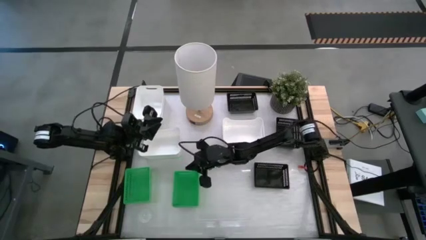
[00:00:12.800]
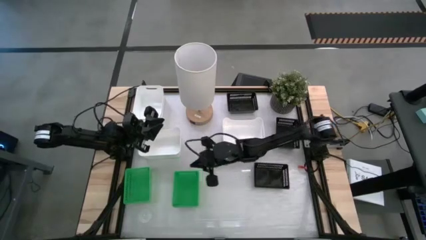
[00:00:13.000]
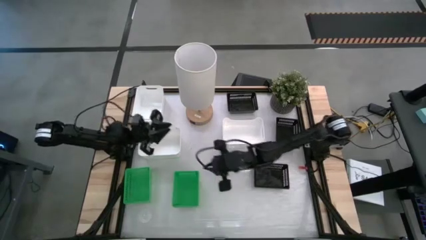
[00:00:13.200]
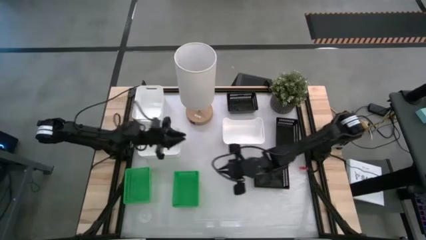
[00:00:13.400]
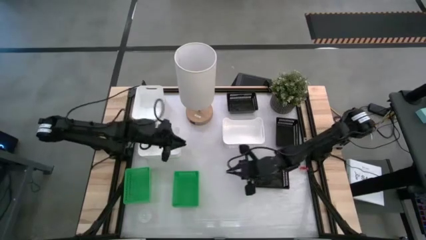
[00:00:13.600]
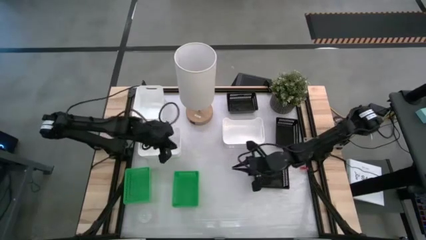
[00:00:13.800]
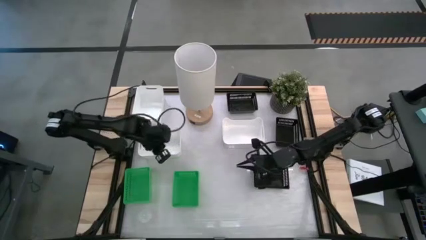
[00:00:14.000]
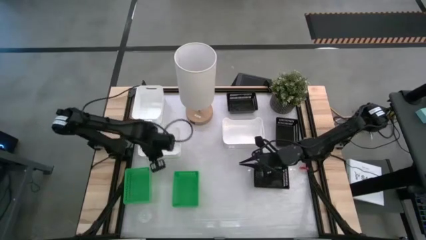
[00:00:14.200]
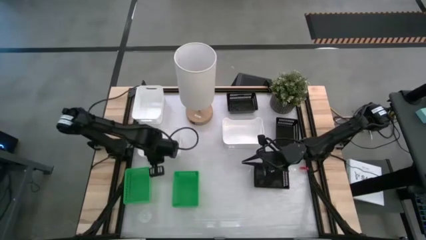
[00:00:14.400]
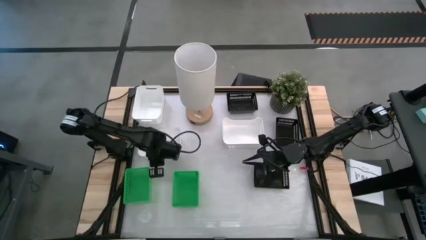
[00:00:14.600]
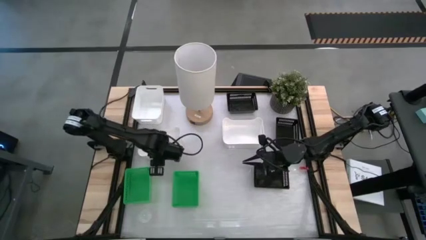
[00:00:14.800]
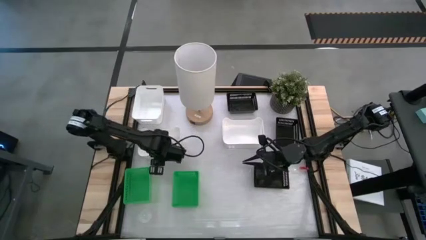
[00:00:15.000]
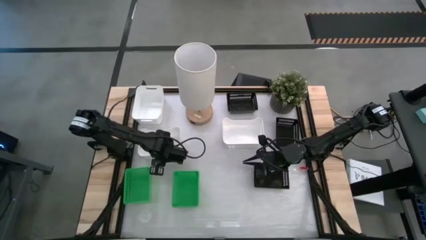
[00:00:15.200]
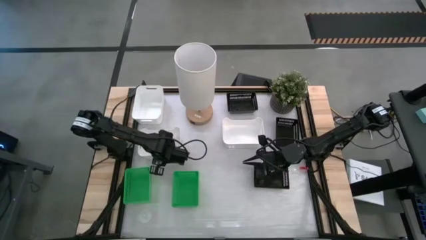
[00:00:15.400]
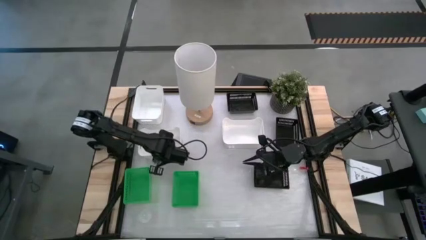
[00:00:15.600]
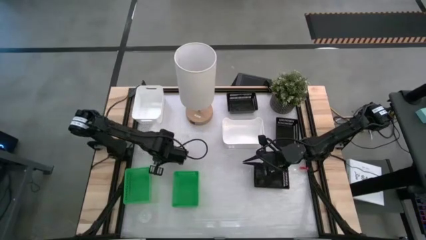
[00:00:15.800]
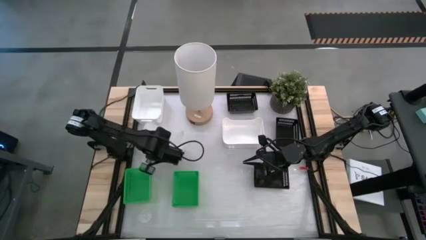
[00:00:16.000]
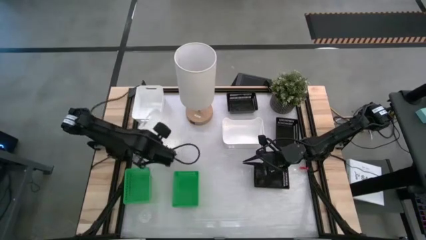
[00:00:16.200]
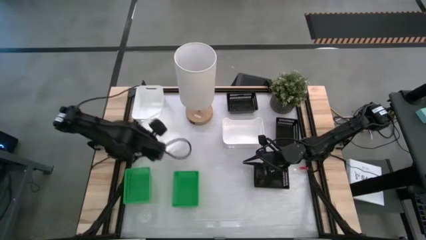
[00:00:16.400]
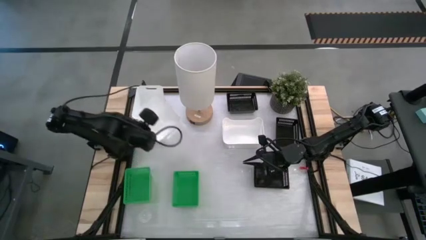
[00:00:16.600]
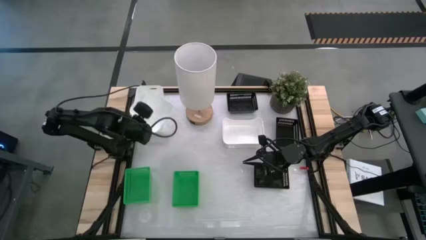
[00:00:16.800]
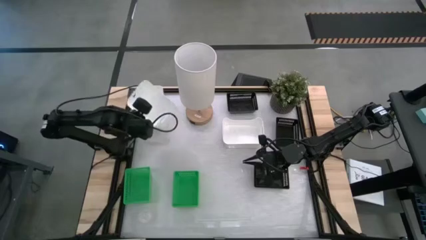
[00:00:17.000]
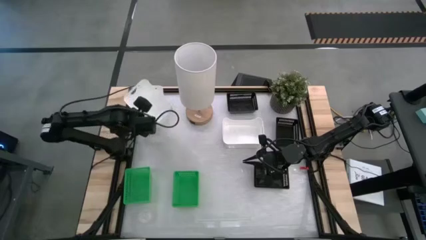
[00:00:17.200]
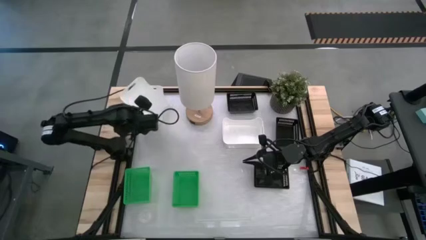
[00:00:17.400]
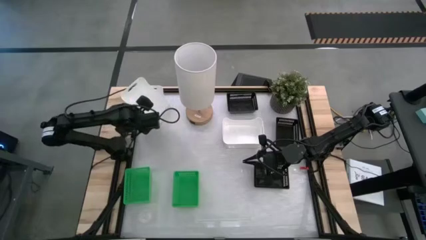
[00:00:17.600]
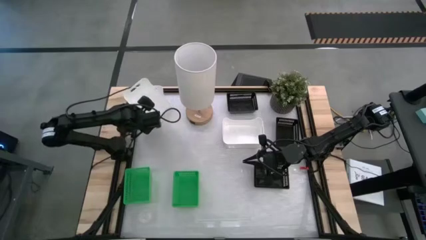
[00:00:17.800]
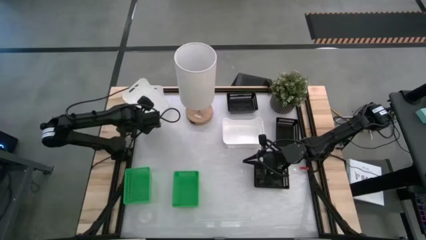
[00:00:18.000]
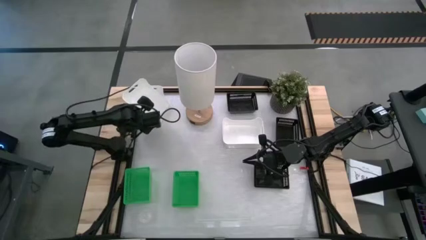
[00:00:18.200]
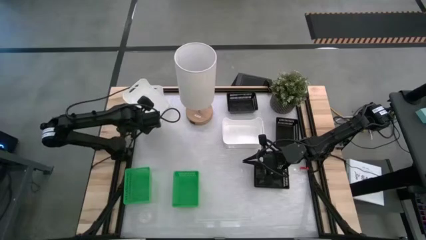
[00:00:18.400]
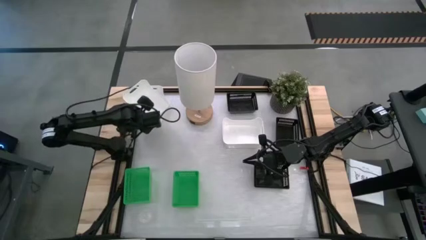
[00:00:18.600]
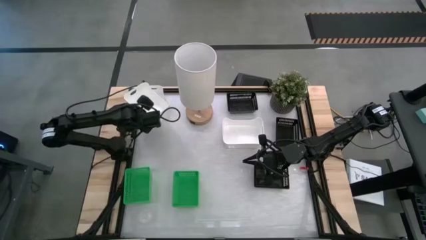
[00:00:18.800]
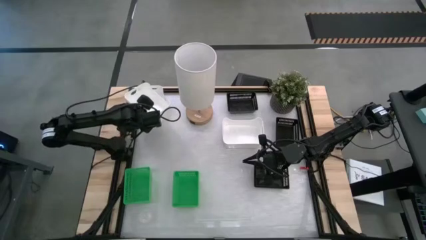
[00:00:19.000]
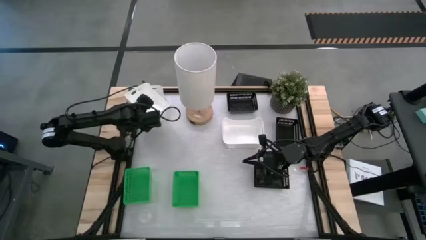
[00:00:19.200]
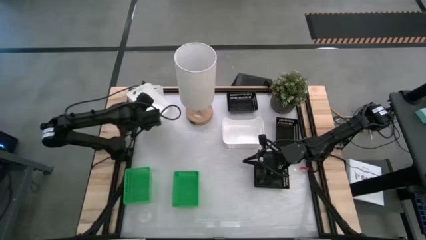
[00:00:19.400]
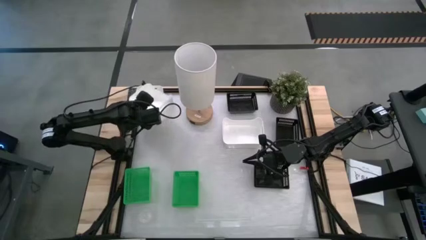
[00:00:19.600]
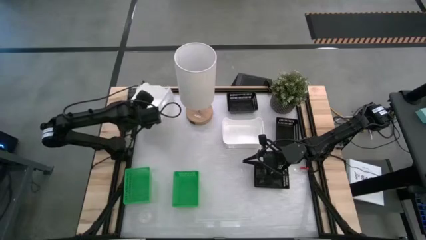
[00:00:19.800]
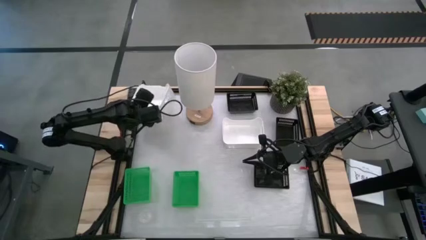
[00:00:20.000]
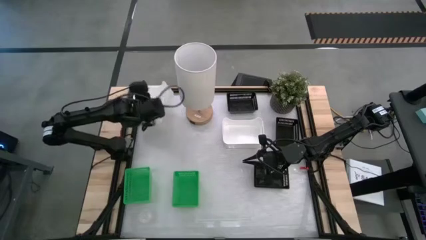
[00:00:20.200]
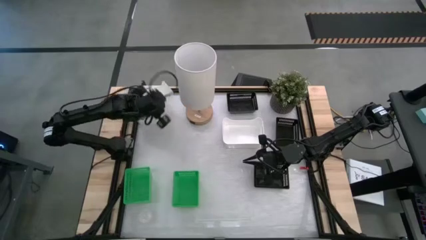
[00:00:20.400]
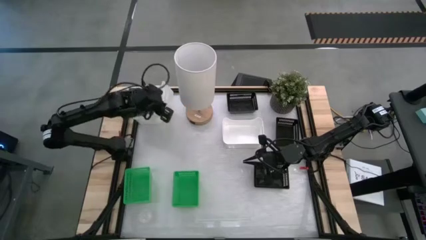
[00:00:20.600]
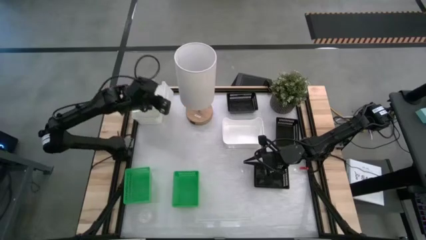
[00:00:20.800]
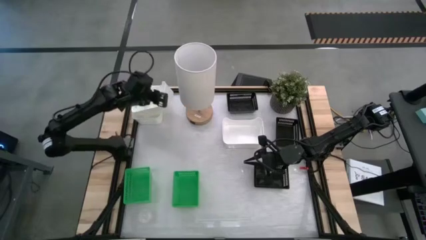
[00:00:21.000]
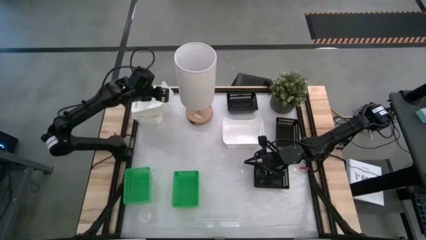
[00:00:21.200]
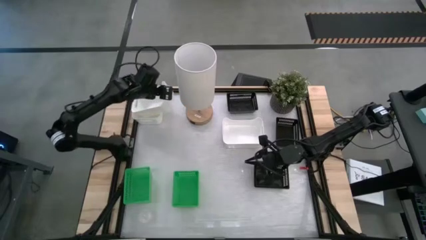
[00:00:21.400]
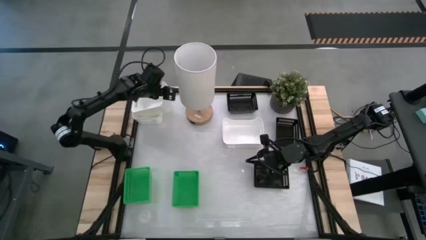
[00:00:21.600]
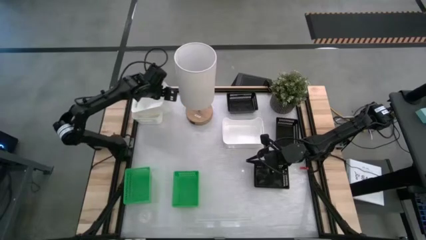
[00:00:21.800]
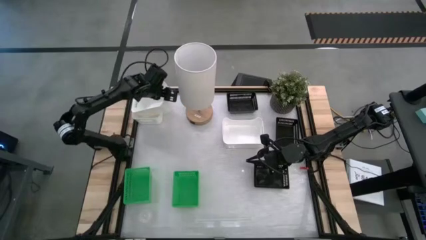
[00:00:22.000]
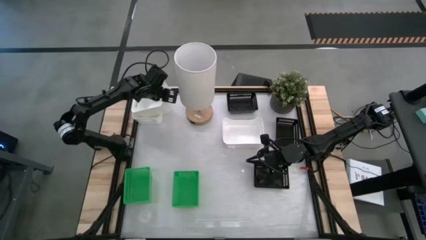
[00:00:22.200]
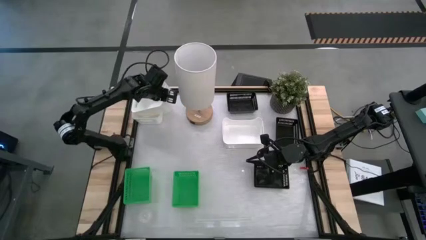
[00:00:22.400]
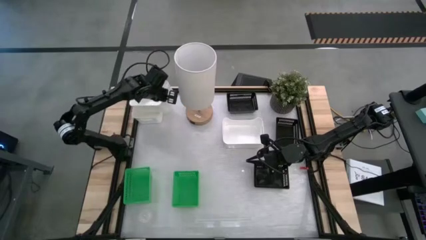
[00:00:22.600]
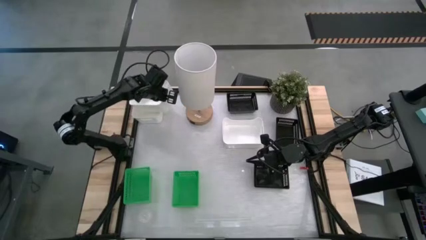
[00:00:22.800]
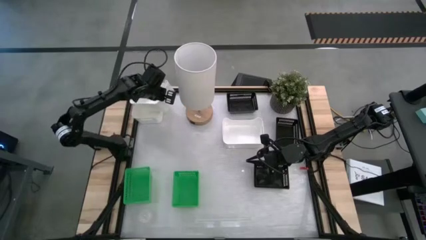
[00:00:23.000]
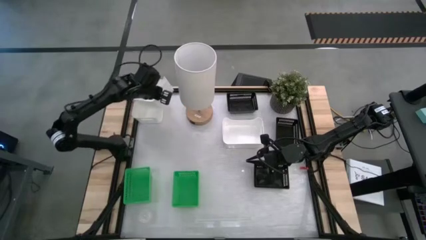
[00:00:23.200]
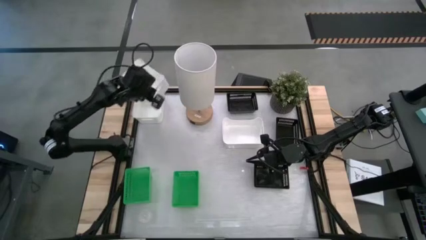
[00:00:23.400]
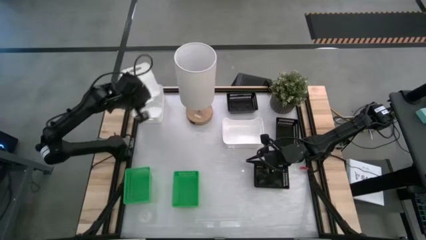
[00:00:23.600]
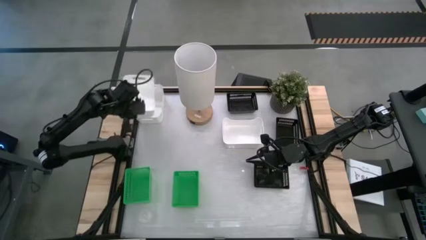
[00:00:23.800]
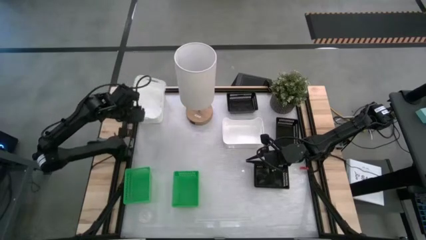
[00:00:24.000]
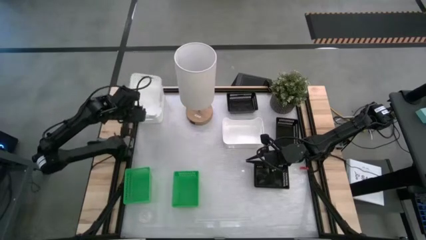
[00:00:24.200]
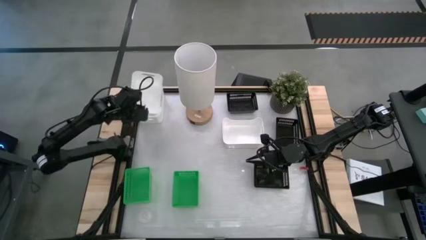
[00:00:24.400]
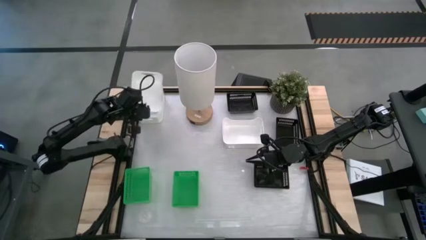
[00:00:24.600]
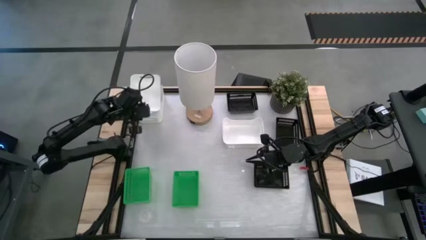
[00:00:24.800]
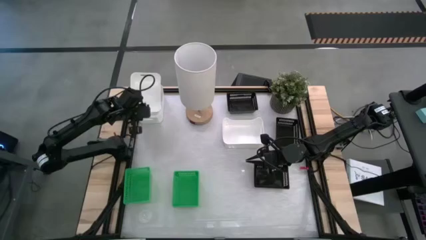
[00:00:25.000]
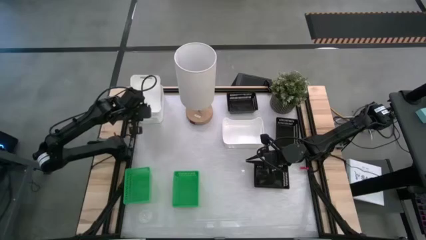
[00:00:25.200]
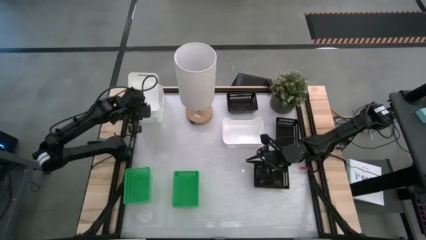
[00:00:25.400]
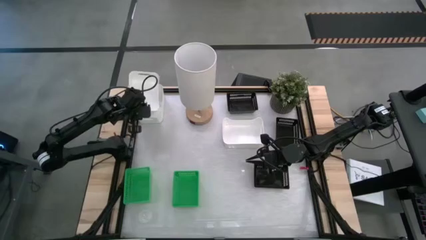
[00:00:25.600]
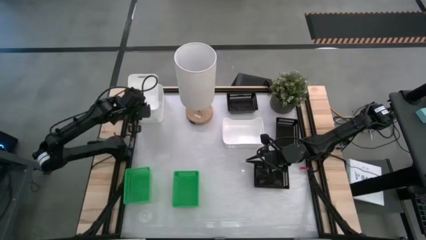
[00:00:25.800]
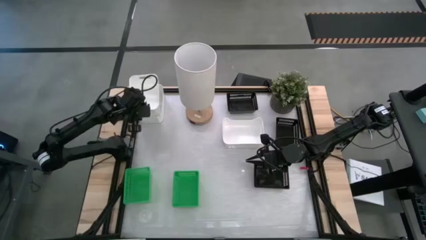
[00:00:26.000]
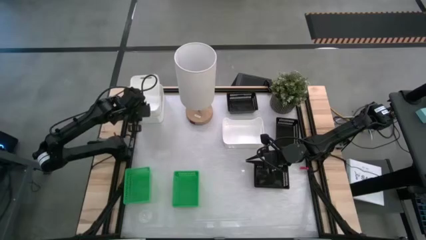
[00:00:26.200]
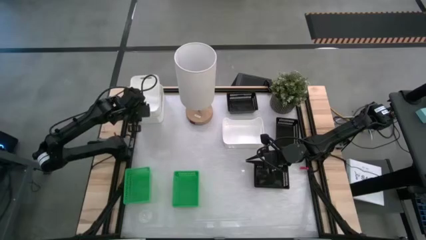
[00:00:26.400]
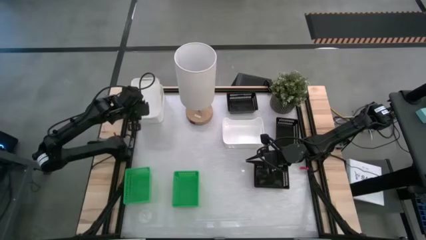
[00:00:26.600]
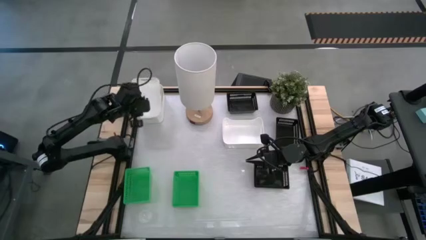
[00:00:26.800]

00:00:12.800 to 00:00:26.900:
Stack the bottom left white bin on the top left white bin
